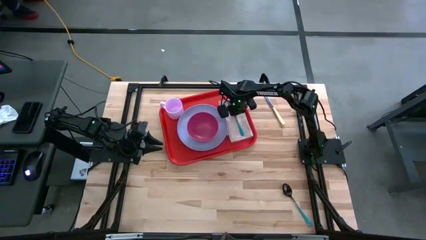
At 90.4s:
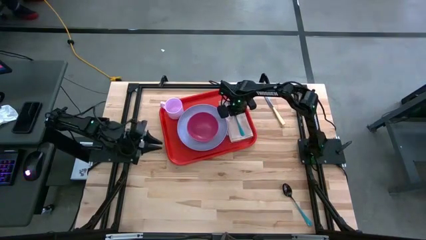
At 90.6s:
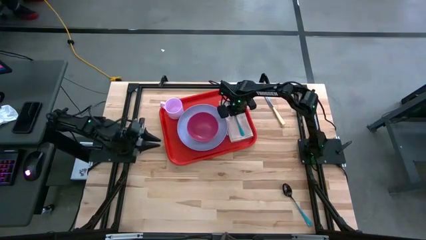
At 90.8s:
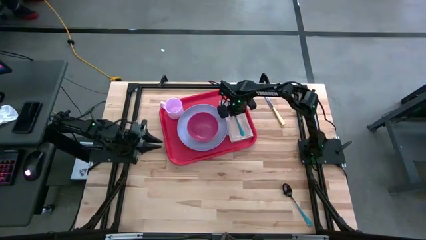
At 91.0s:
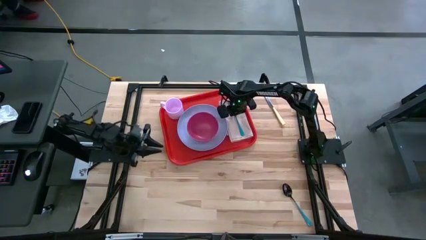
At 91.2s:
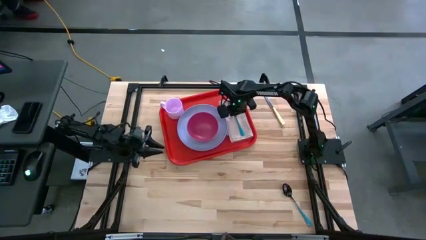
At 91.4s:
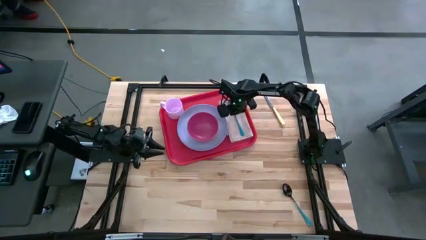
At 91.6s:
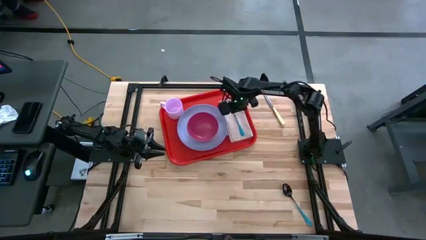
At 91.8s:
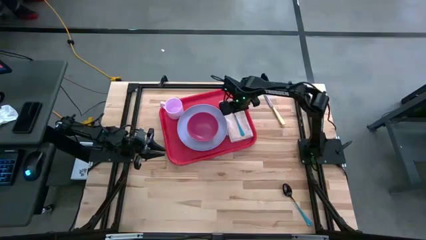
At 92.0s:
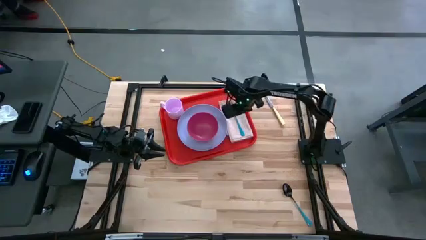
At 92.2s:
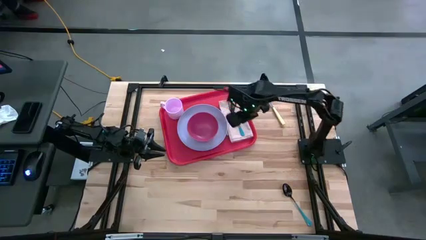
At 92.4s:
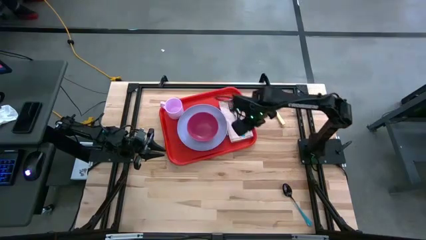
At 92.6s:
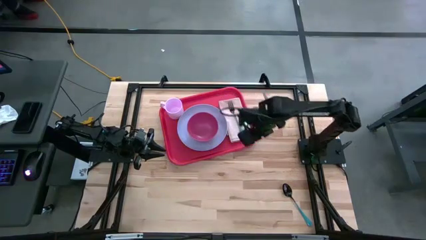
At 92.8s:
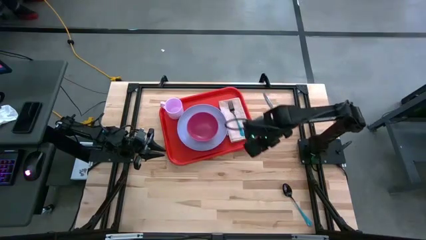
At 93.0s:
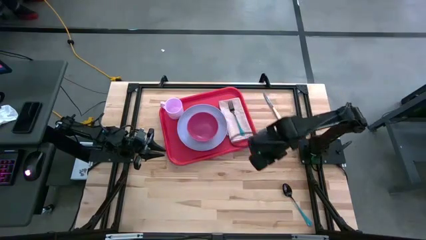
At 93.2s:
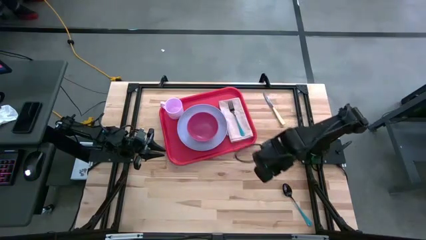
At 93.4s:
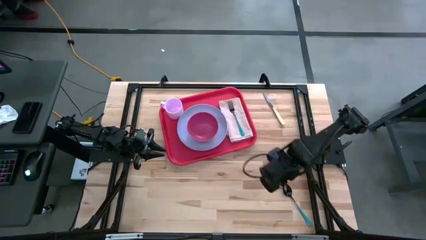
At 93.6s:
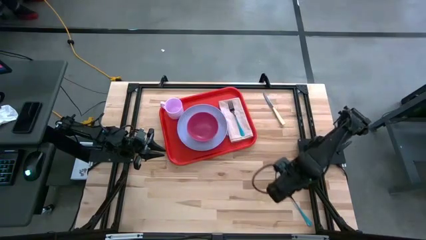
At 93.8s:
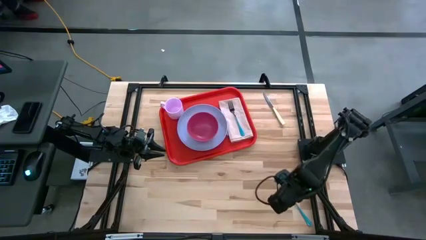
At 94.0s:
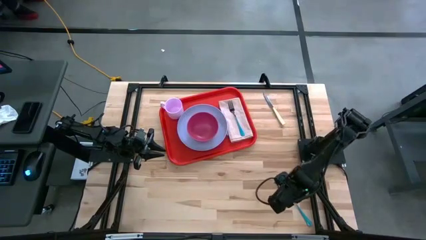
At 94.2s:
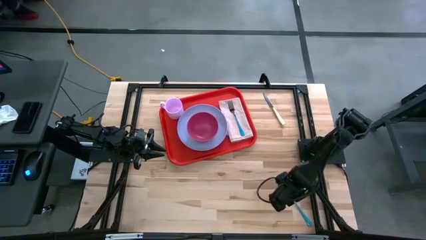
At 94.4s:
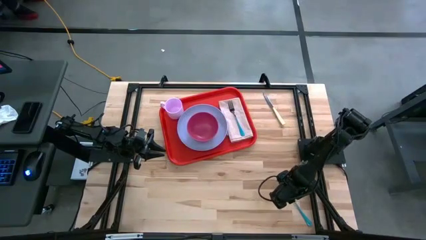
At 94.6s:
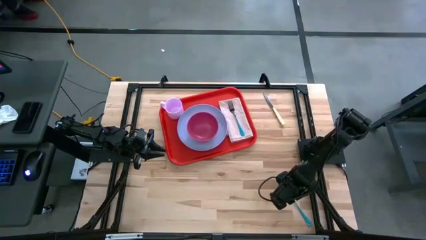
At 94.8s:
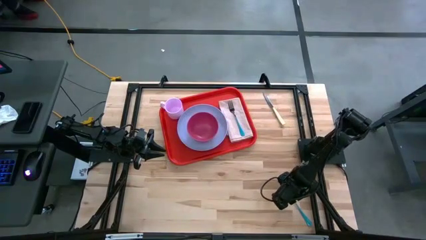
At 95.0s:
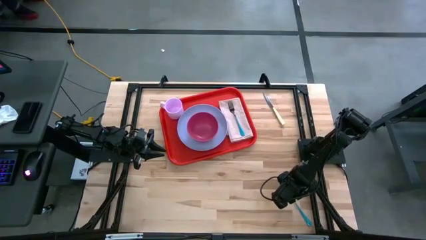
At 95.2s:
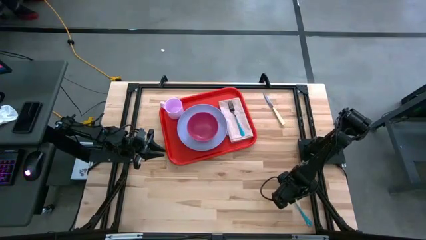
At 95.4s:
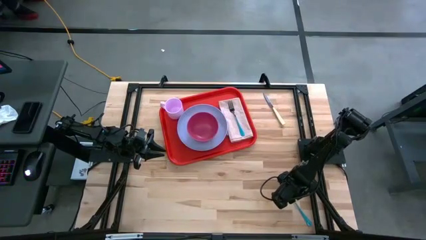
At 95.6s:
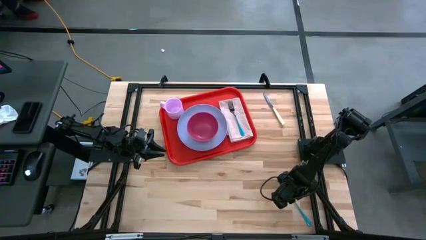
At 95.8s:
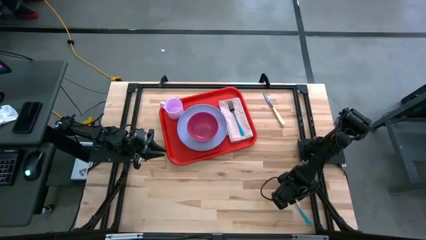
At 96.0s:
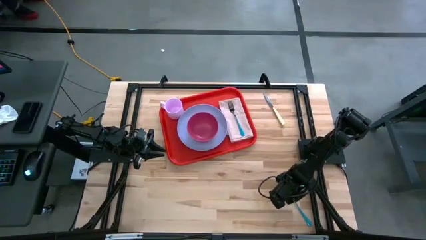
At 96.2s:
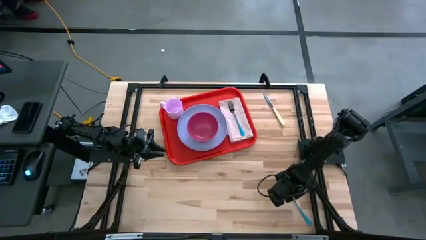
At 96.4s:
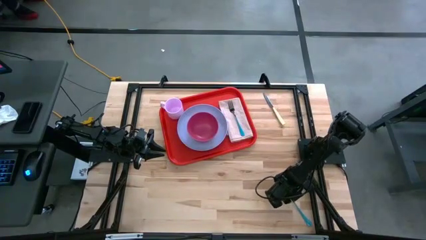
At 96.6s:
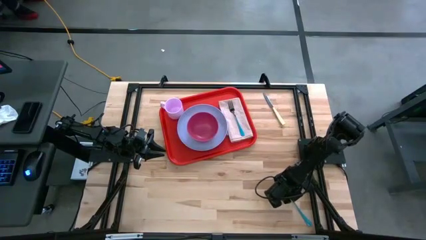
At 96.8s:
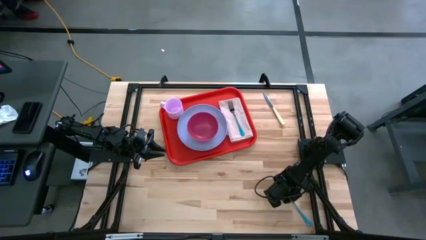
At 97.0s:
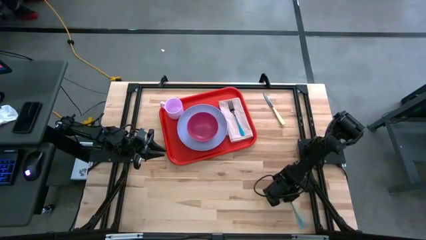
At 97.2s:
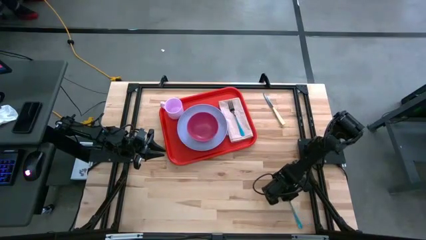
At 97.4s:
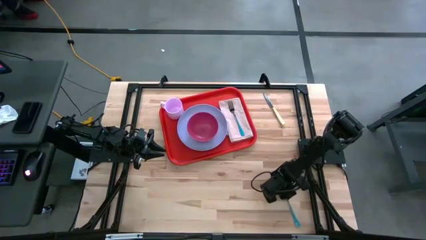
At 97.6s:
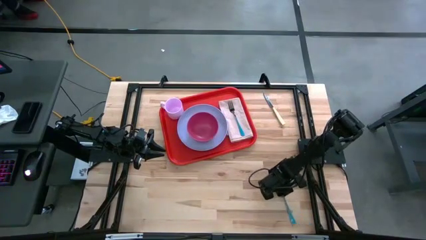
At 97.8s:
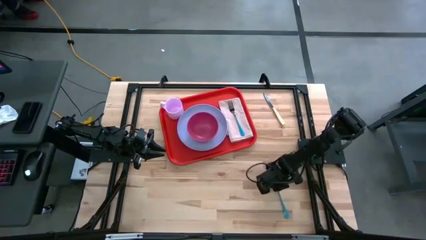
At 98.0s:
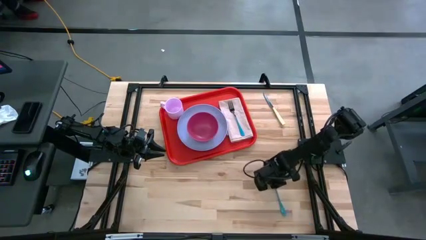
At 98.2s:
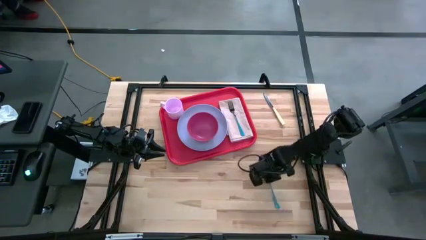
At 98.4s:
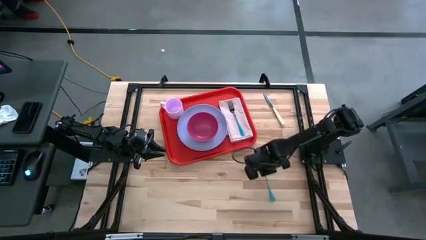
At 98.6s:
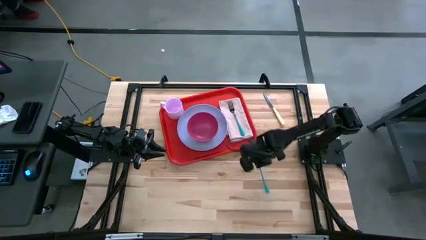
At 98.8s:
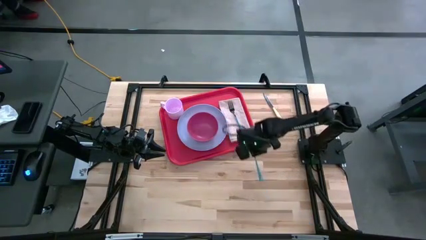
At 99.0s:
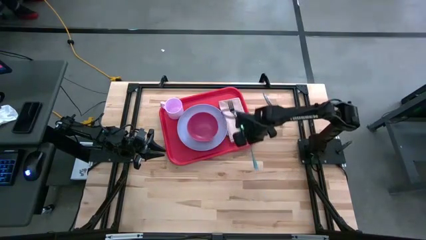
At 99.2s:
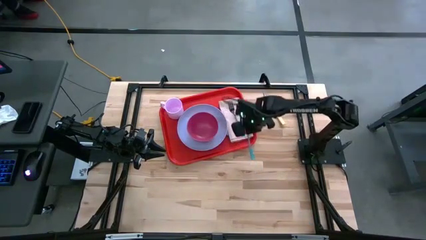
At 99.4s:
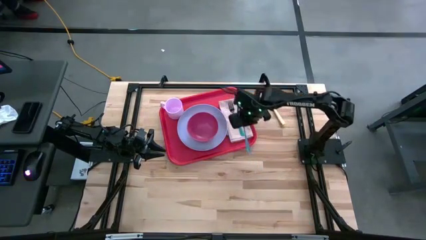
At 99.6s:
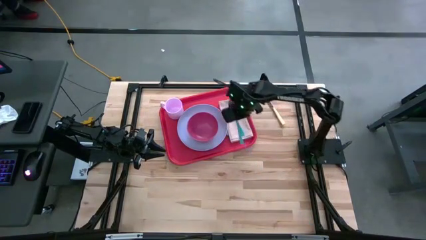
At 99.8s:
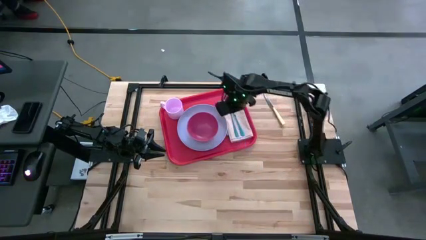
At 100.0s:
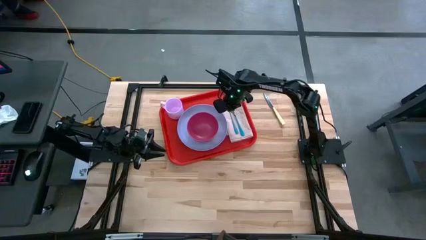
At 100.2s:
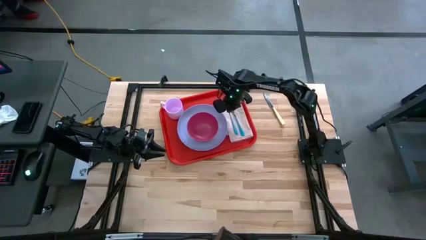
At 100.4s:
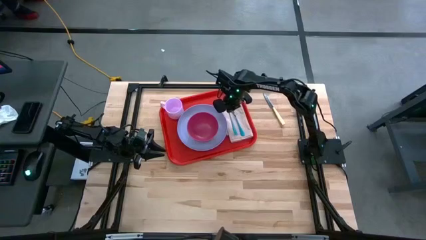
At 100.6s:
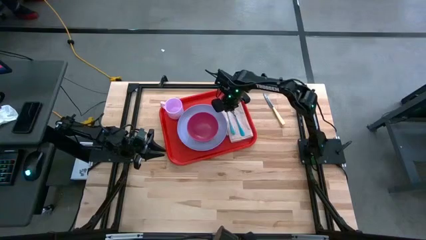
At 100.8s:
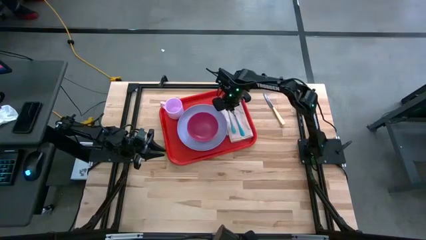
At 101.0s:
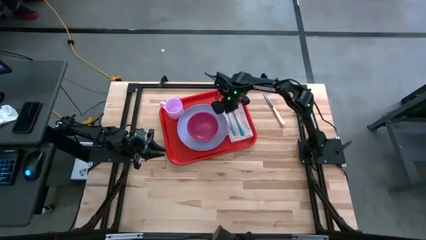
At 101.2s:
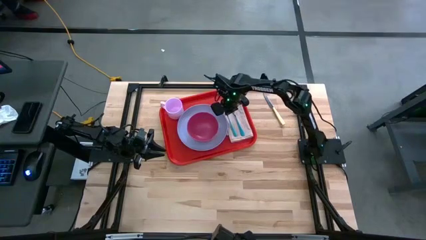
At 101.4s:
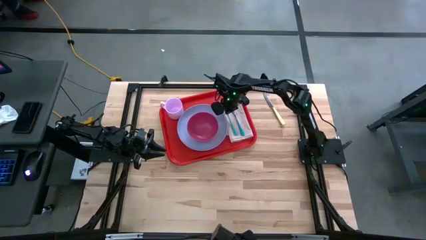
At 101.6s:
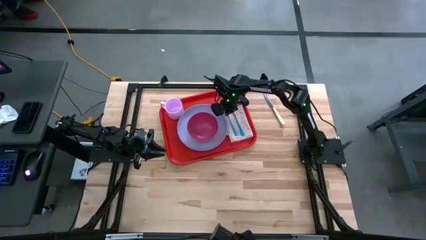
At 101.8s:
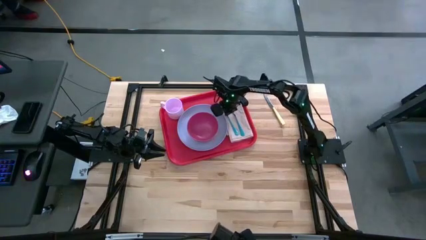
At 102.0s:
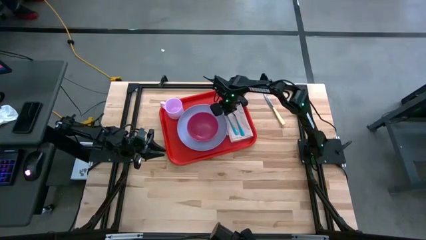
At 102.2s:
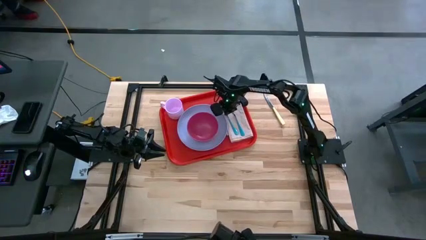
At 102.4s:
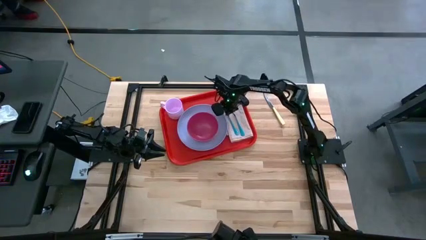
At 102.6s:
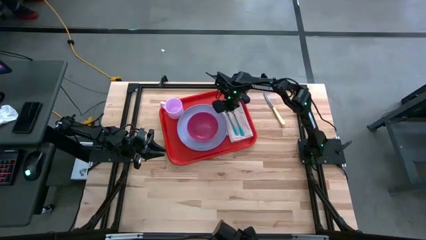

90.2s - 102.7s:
Task: Set up tray
Put the blue spoon on the brown napkin to the left of the blue fork

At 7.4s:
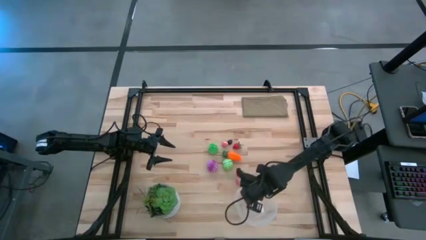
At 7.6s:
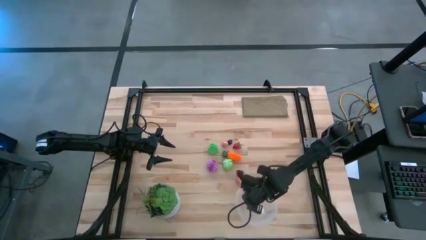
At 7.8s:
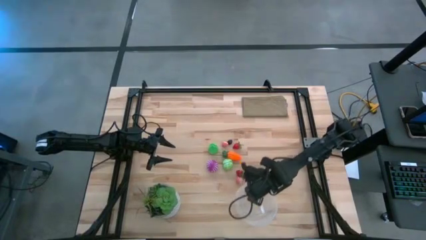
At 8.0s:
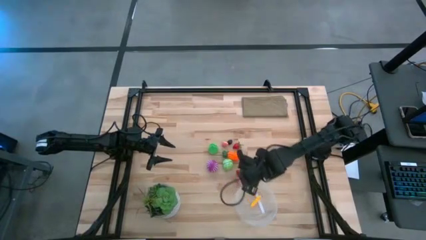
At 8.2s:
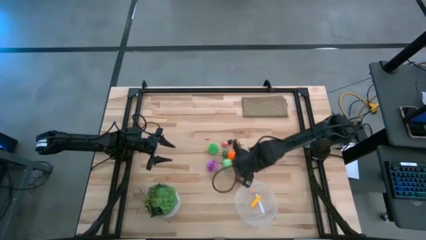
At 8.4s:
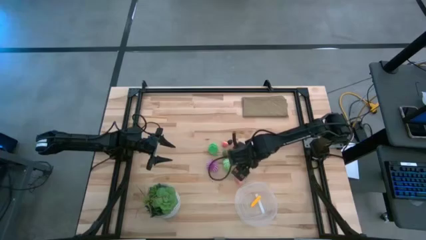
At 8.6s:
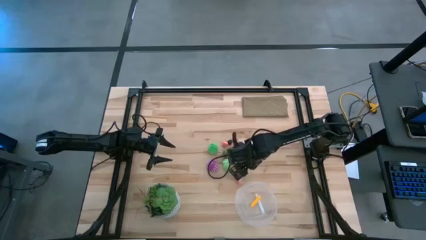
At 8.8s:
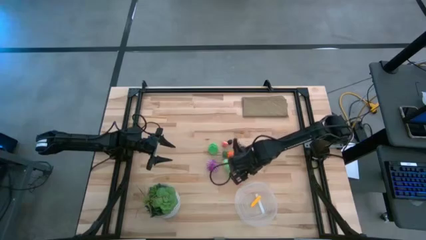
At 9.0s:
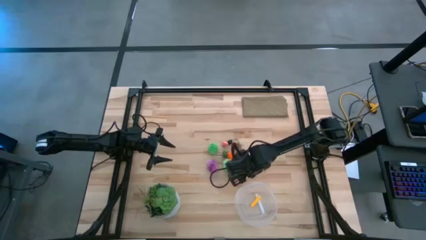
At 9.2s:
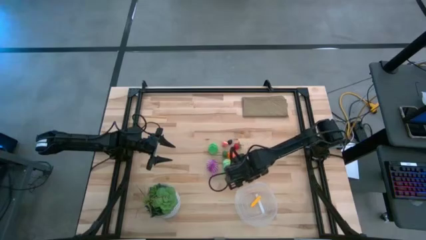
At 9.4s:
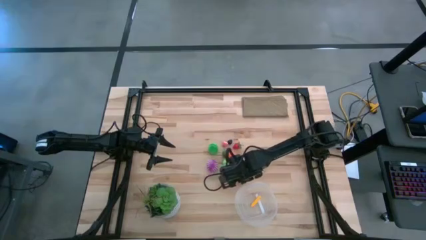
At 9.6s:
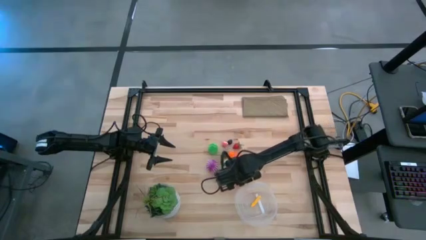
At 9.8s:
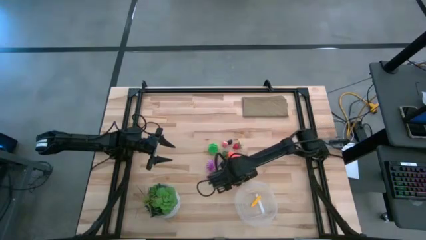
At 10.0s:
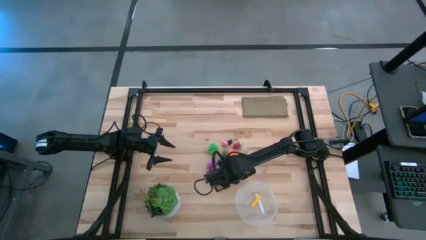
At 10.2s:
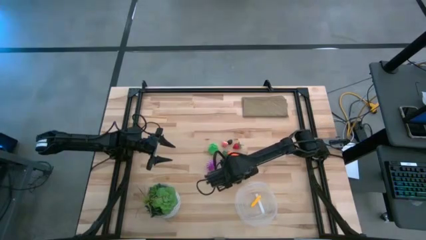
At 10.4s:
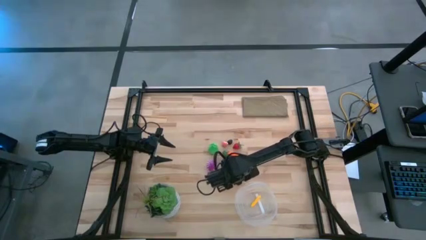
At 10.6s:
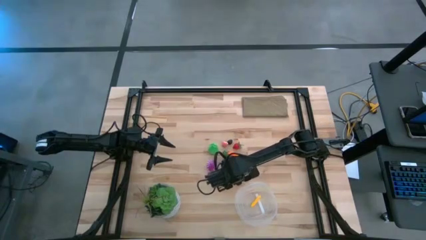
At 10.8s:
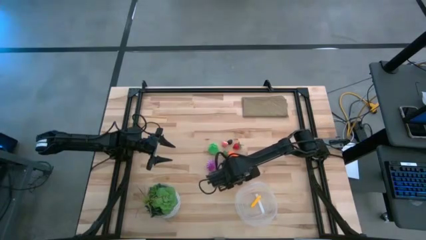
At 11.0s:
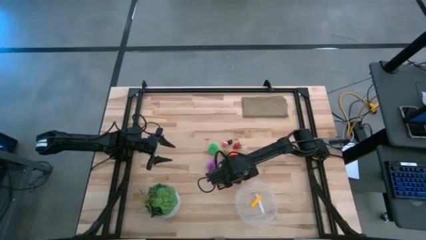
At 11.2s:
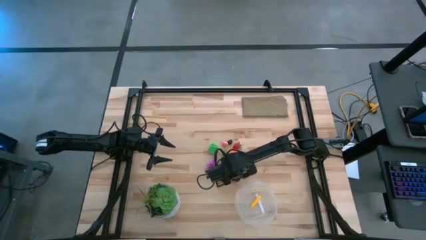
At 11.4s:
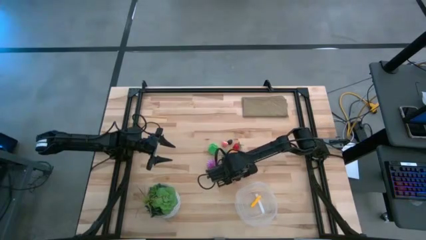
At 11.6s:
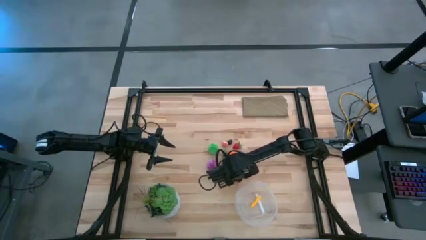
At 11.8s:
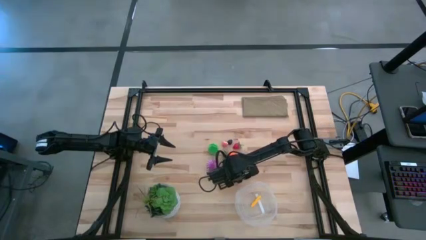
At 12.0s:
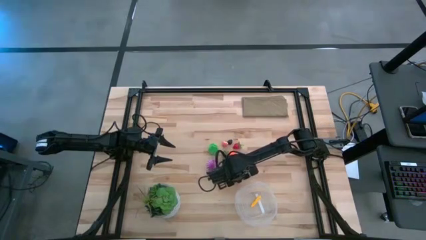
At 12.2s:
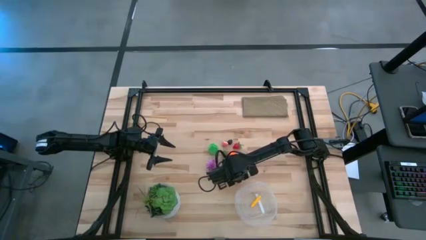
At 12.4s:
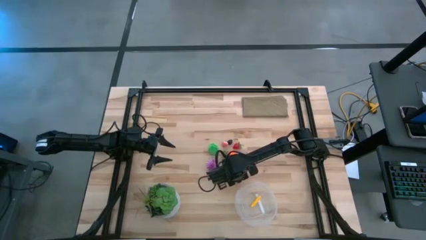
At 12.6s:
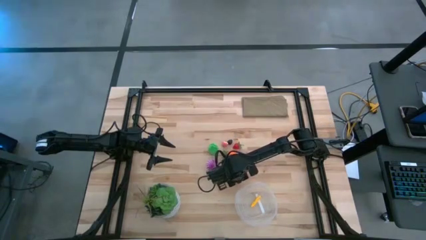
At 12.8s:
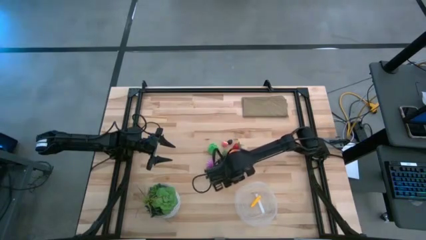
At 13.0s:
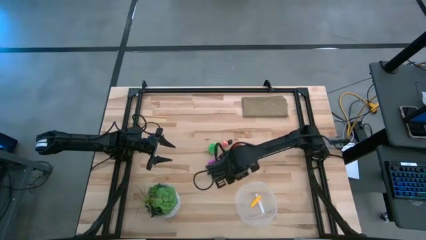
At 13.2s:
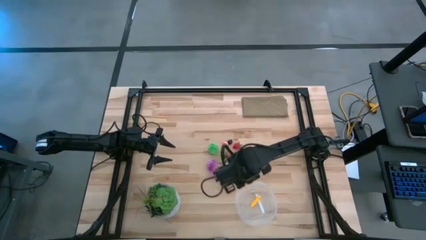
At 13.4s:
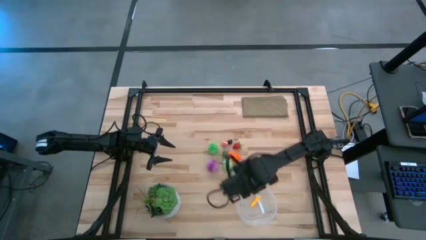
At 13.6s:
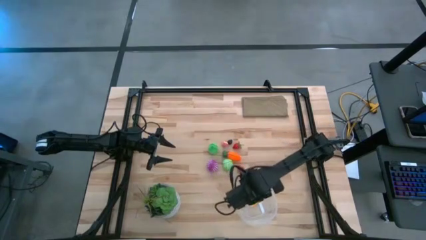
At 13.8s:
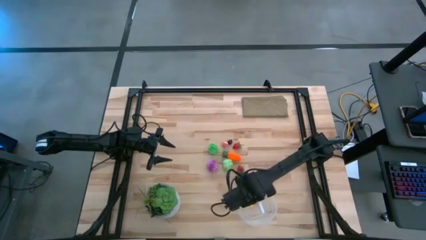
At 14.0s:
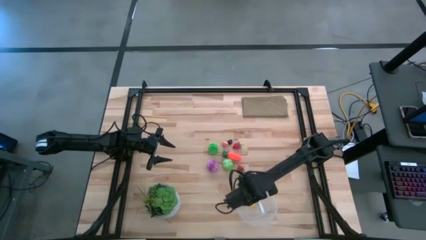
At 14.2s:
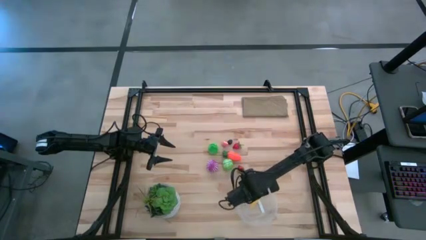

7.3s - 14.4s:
Task: Pick and placing Produce into tupperware
Put the bottom pink peach into the transparent container
